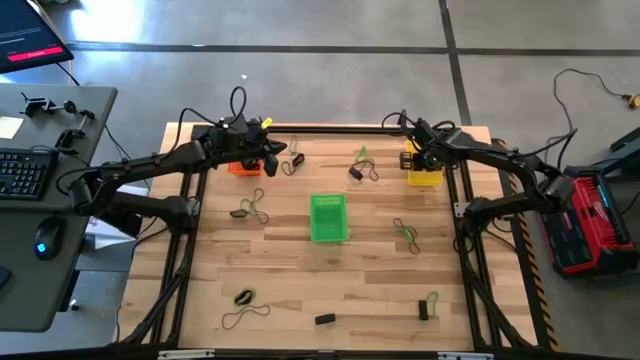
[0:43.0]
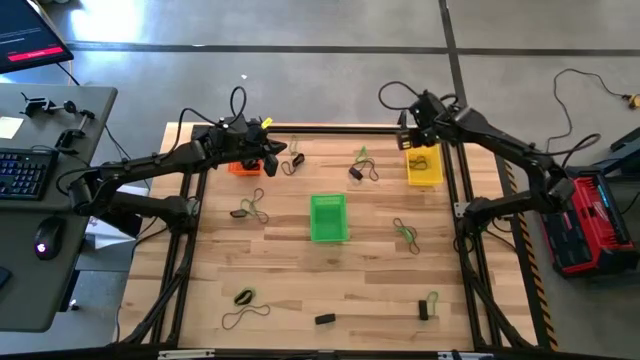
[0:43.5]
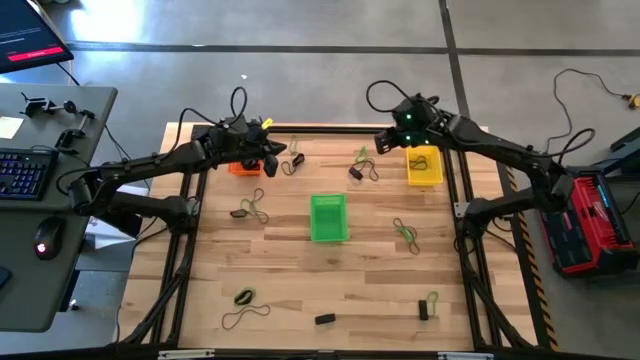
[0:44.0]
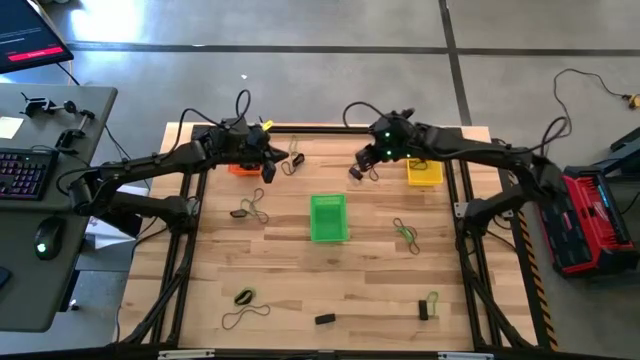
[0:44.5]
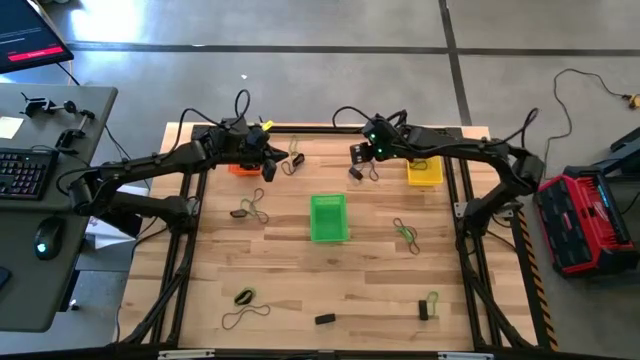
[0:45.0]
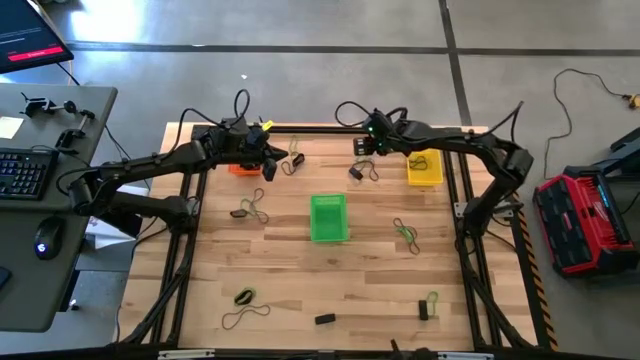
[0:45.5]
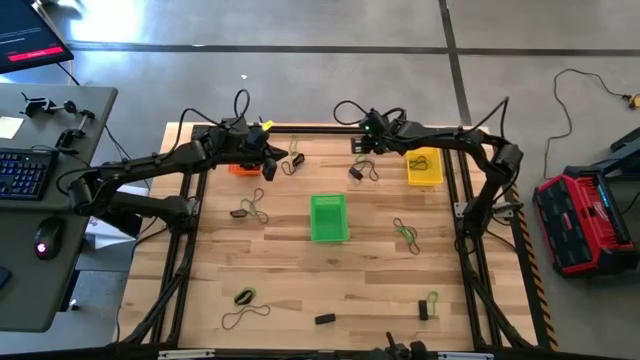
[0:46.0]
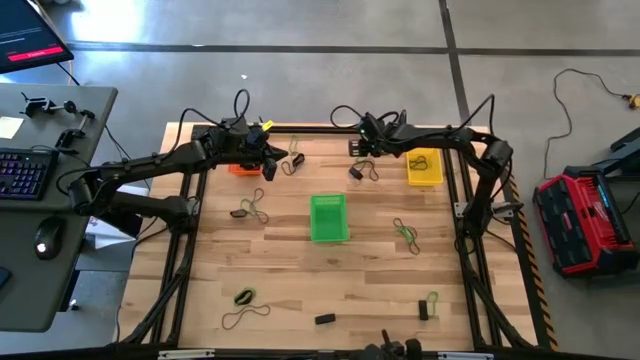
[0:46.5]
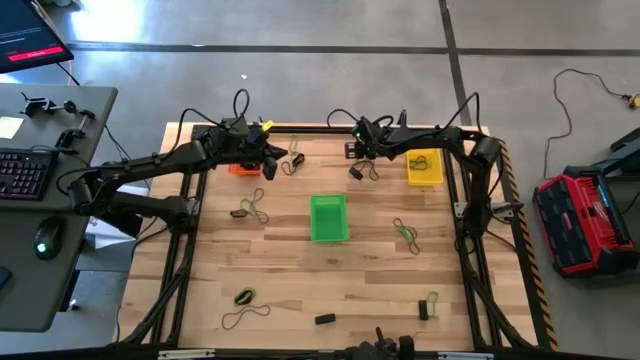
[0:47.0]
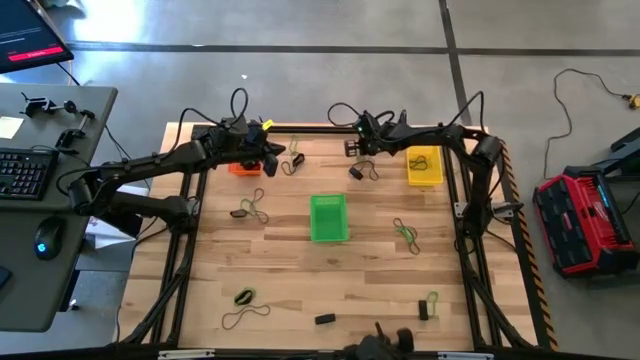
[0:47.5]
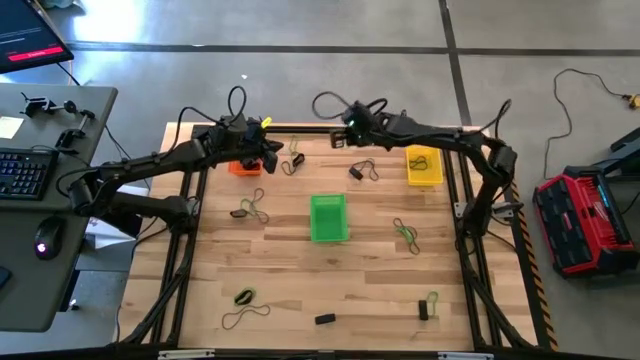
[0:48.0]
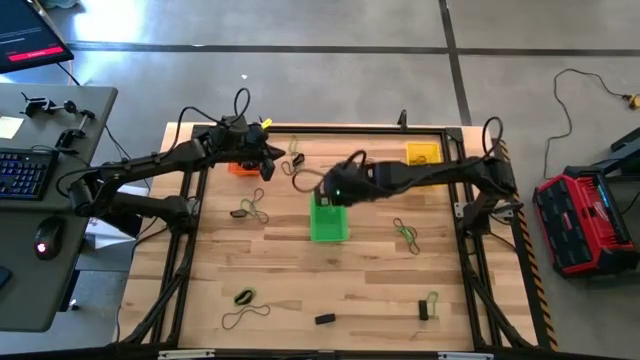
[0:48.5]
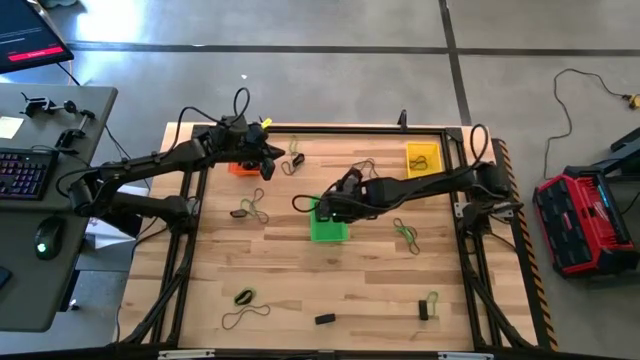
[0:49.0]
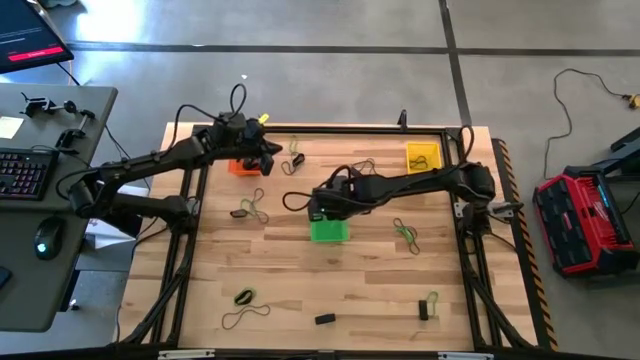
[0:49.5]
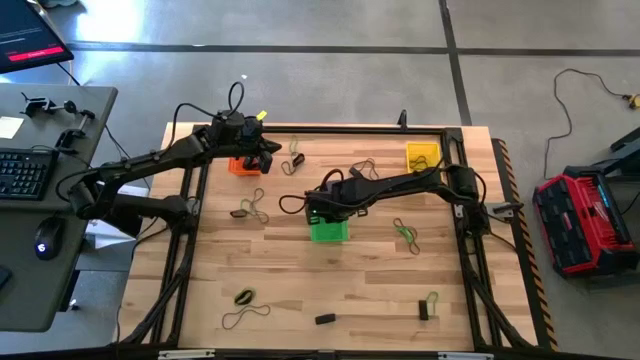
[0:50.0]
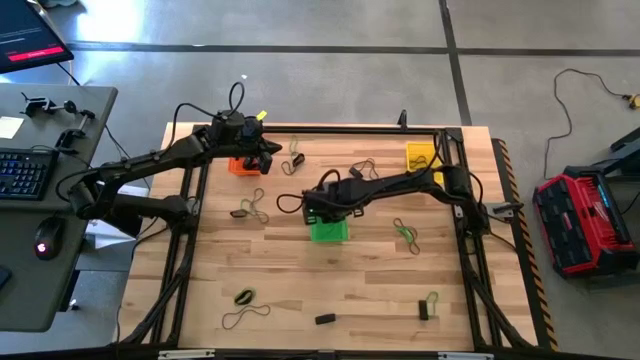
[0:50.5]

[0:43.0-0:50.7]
Task: Sort rubber bands into baskets
Put the green rubber band into the green bin

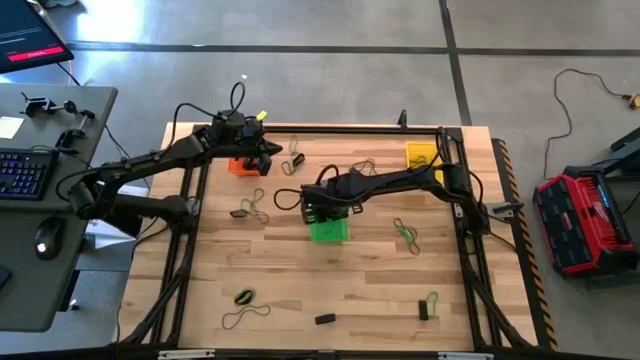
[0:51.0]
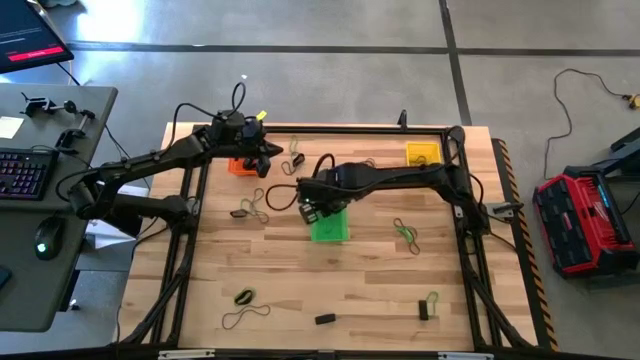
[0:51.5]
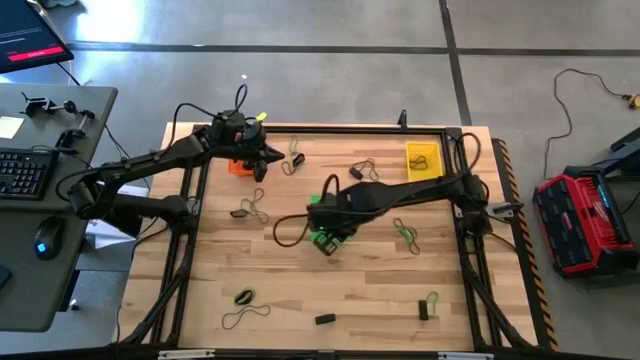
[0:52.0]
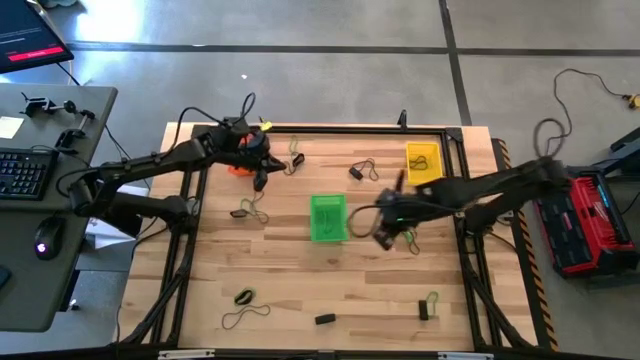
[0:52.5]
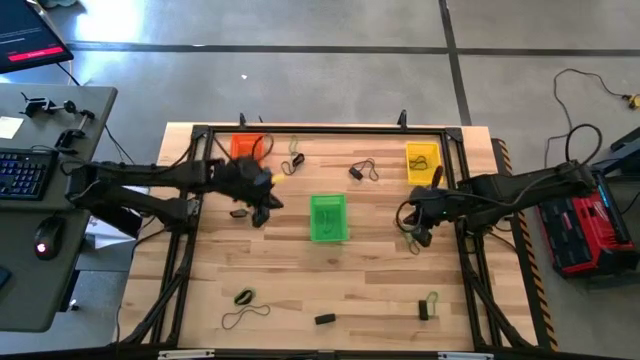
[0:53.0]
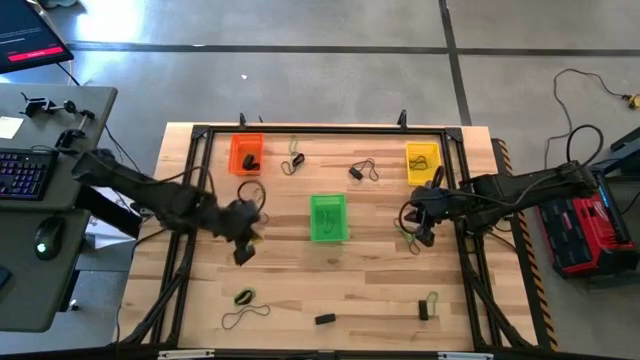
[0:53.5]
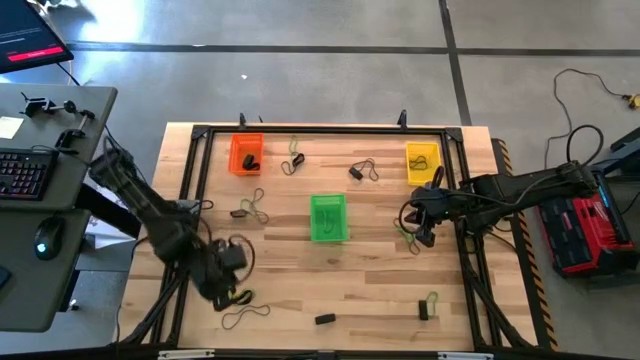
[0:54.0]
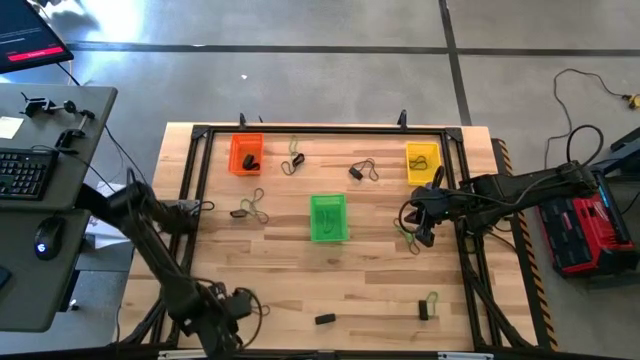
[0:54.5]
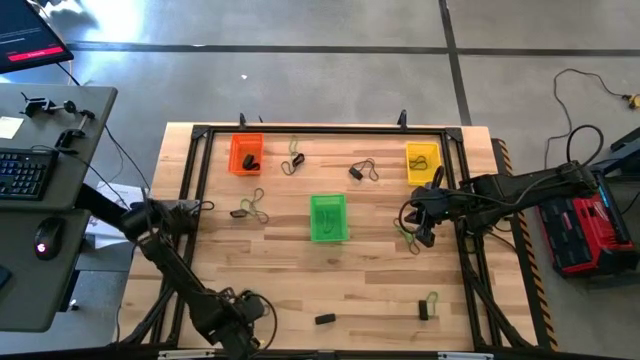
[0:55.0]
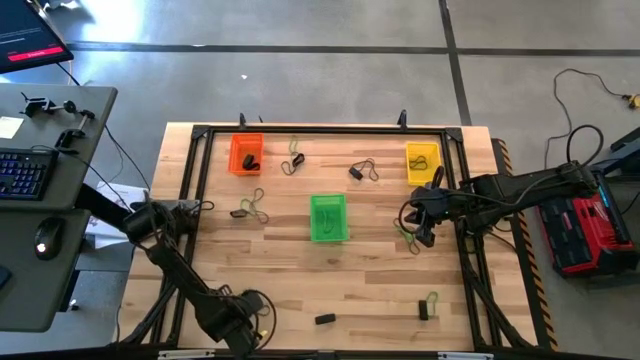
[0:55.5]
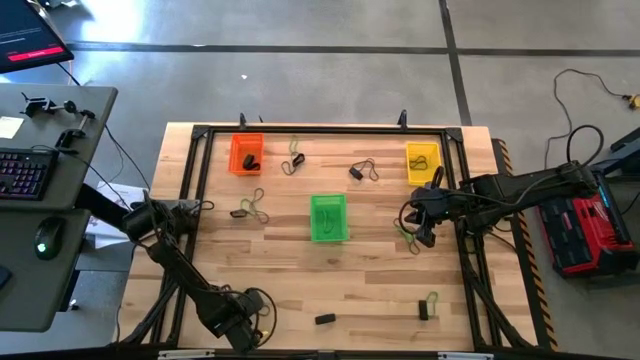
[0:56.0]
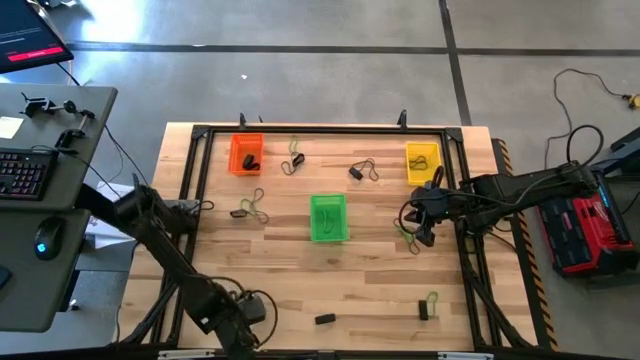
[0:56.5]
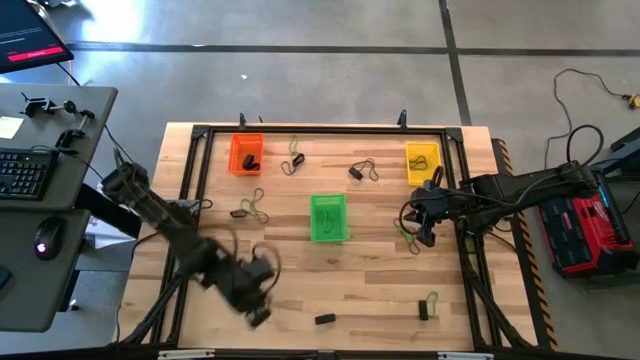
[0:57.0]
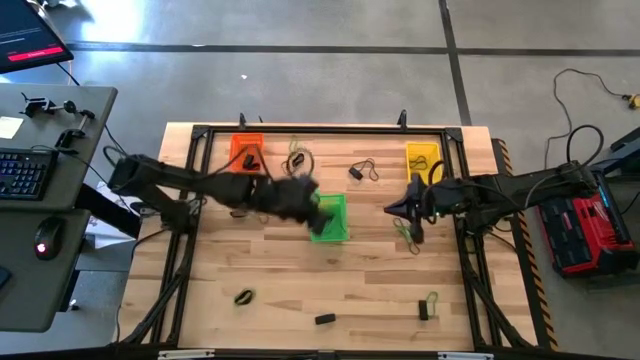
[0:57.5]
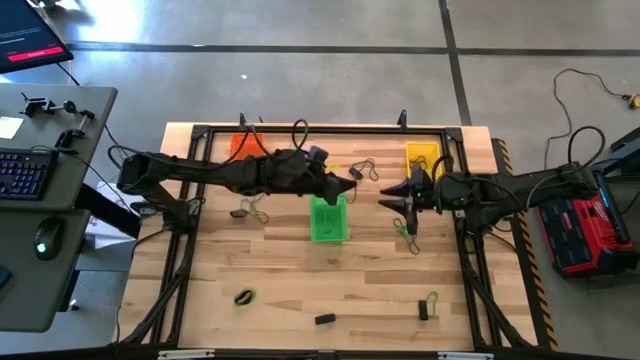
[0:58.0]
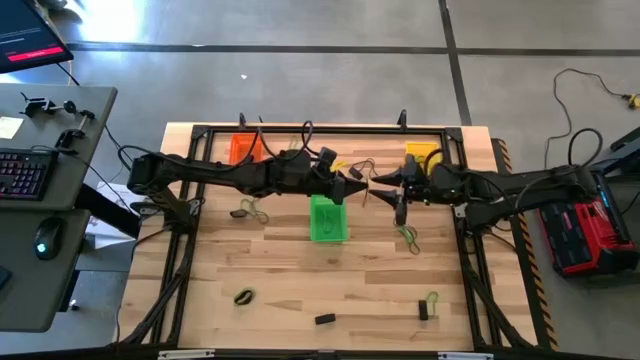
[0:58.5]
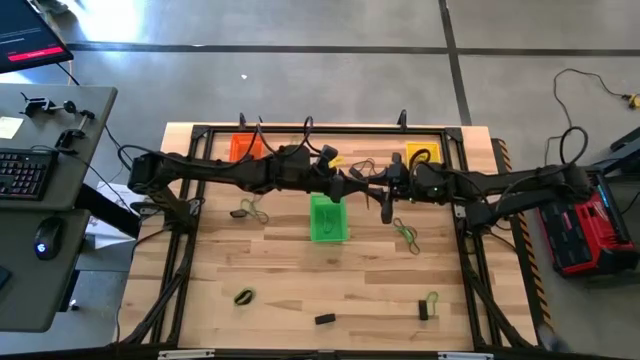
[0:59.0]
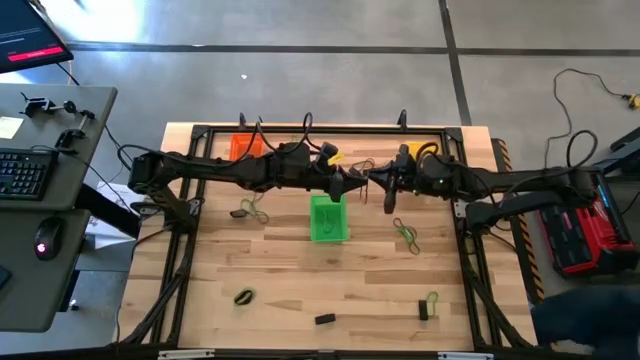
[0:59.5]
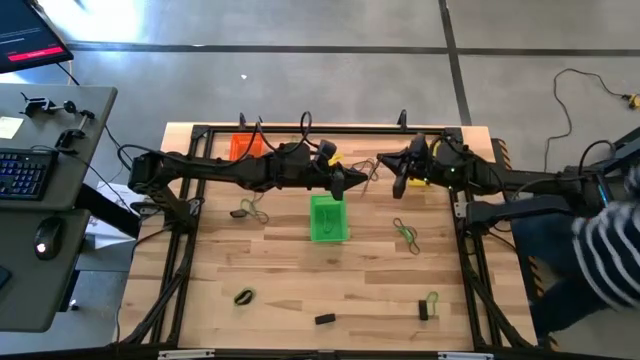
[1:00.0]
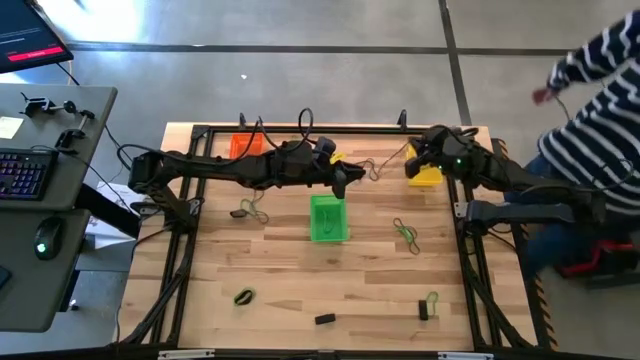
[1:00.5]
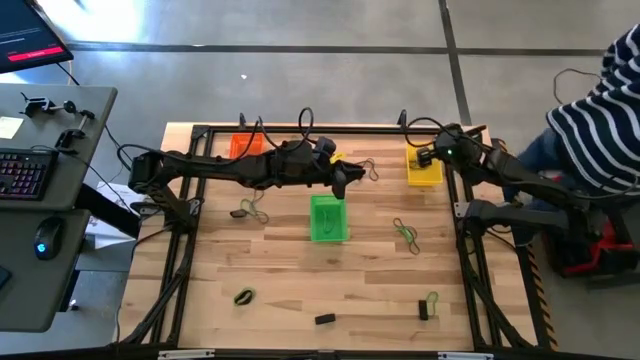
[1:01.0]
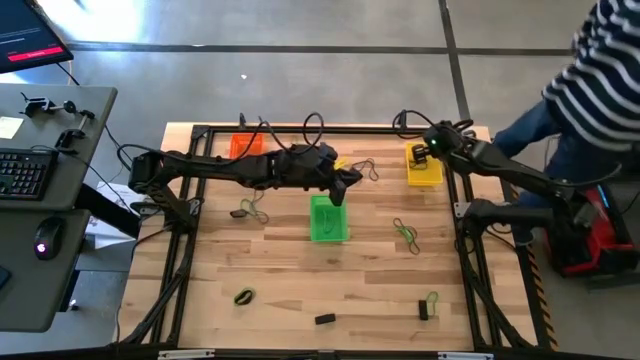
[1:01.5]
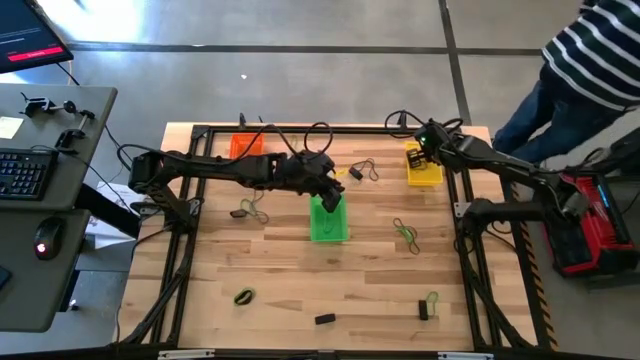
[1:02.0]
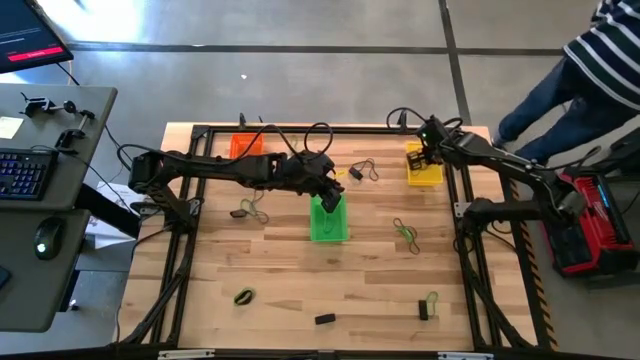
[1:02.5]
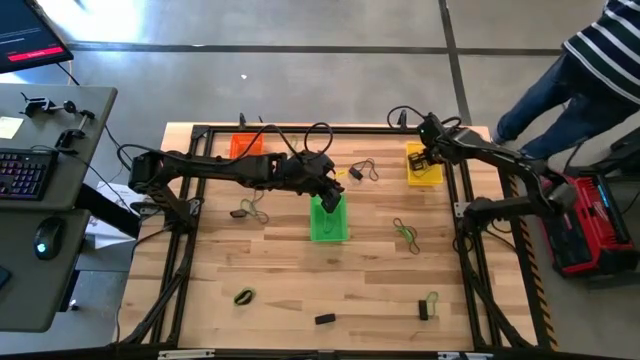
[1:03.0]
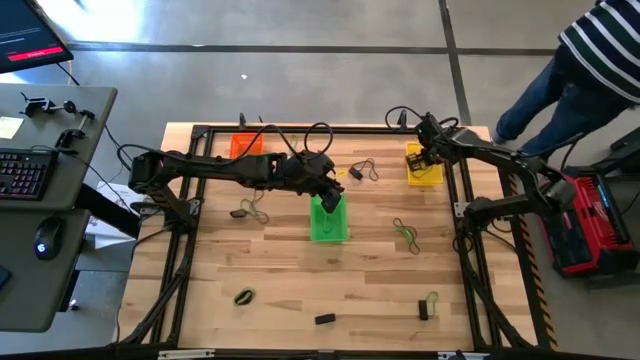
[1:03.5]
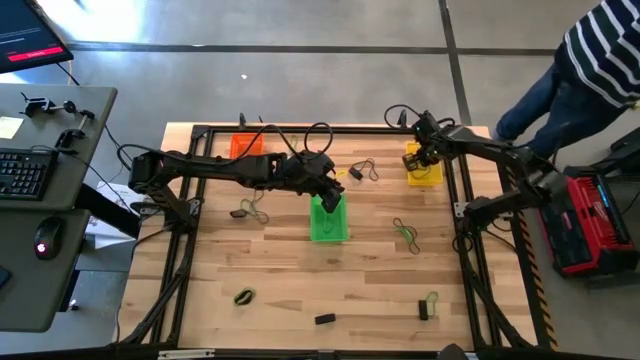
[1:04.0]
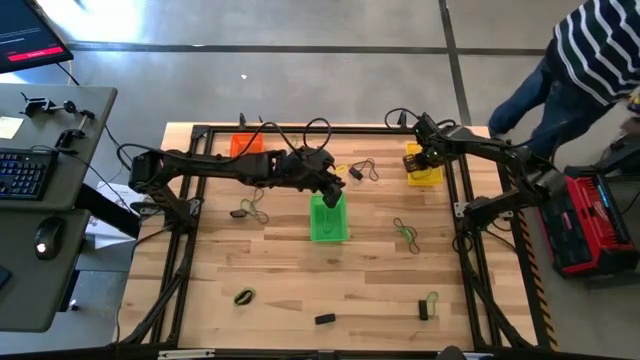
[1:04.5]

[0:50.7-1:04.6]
Put the purple rubber band into the yellow bin
